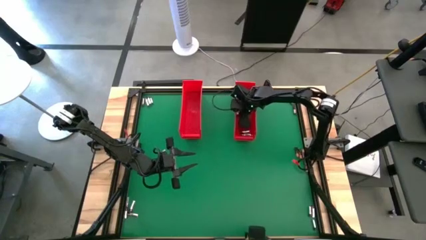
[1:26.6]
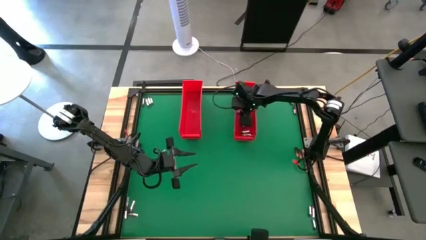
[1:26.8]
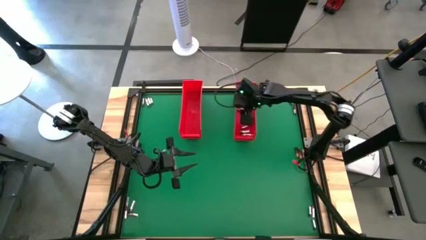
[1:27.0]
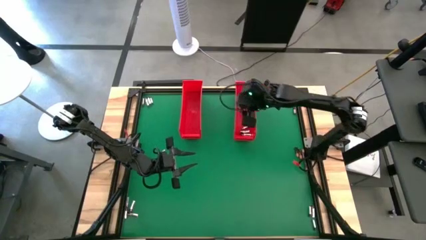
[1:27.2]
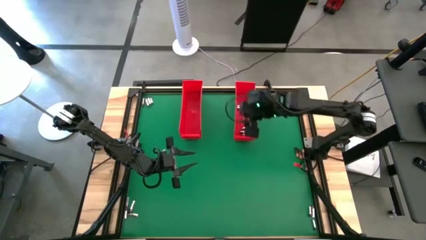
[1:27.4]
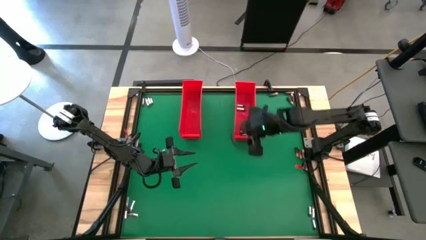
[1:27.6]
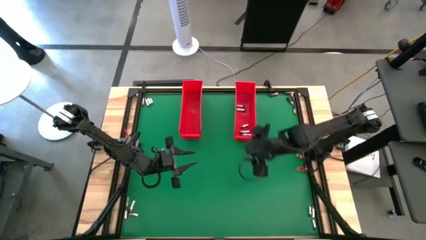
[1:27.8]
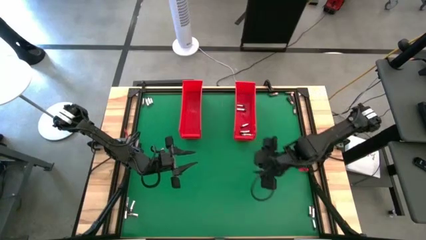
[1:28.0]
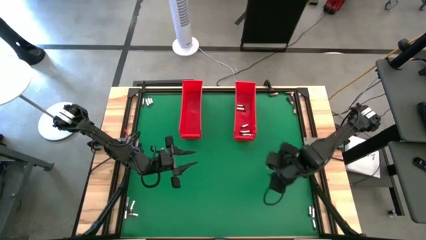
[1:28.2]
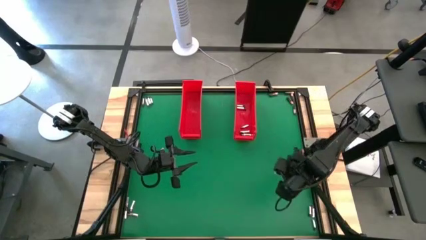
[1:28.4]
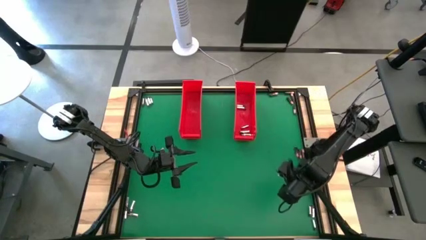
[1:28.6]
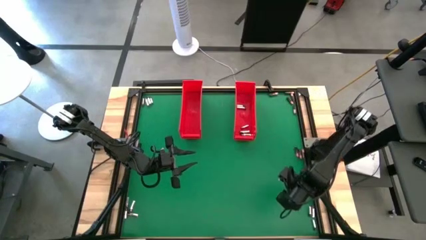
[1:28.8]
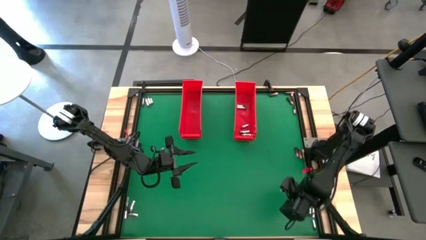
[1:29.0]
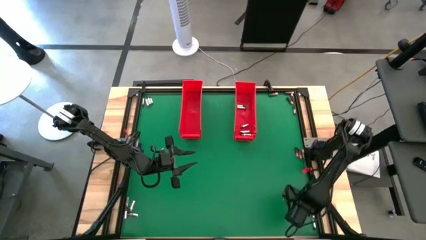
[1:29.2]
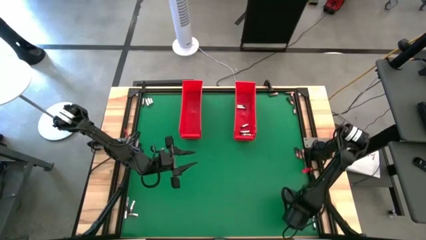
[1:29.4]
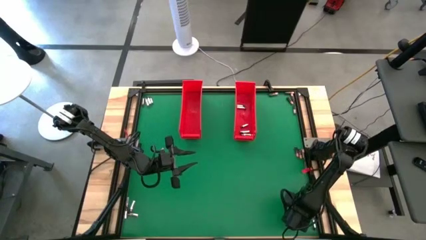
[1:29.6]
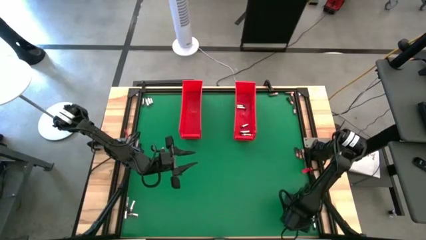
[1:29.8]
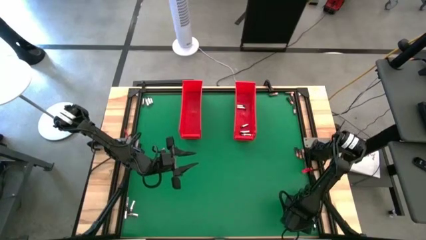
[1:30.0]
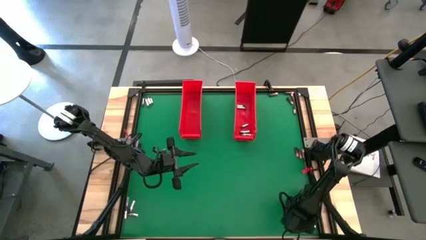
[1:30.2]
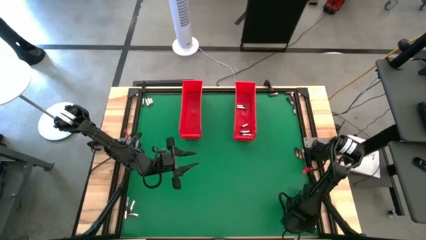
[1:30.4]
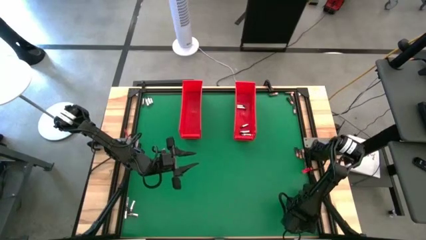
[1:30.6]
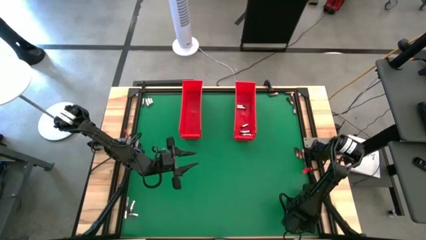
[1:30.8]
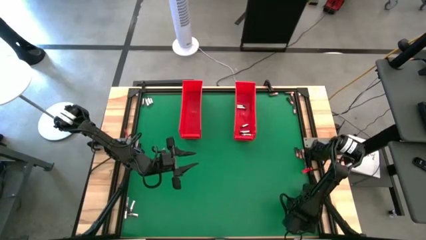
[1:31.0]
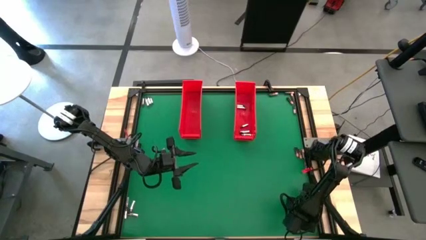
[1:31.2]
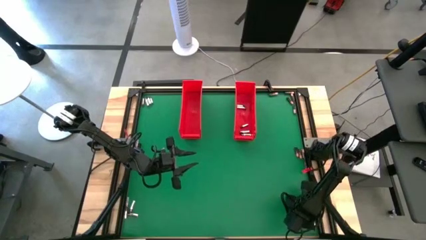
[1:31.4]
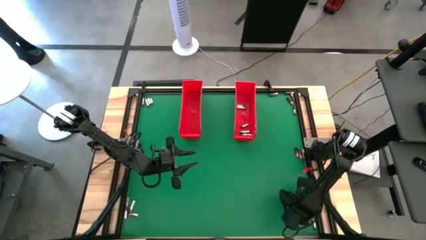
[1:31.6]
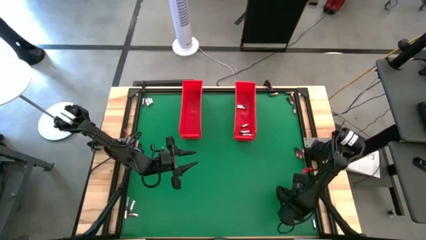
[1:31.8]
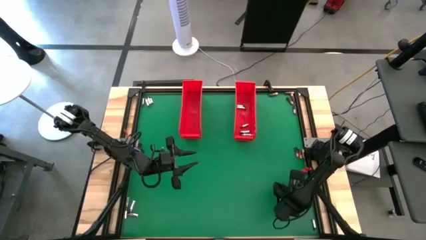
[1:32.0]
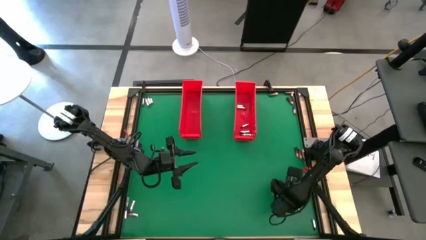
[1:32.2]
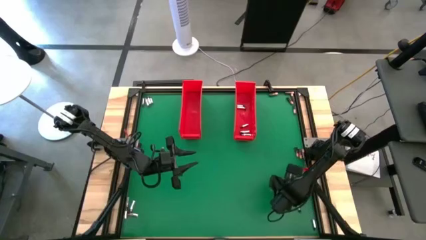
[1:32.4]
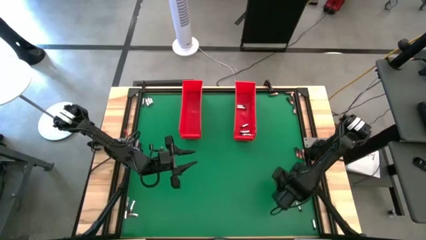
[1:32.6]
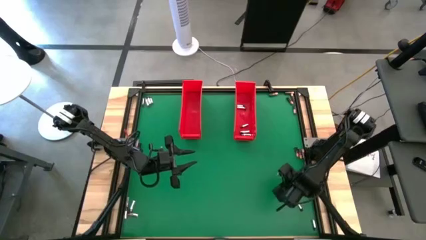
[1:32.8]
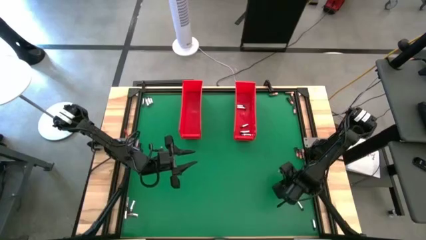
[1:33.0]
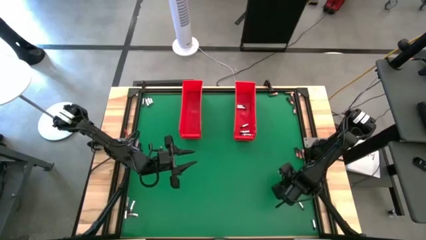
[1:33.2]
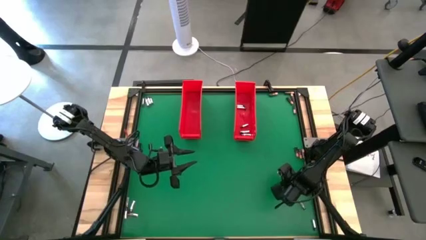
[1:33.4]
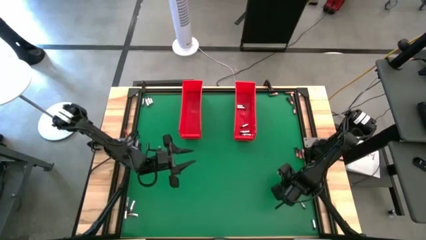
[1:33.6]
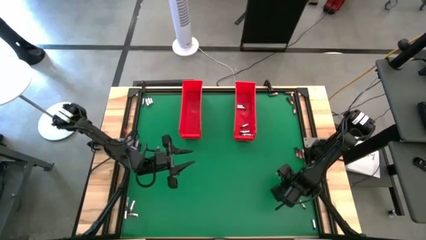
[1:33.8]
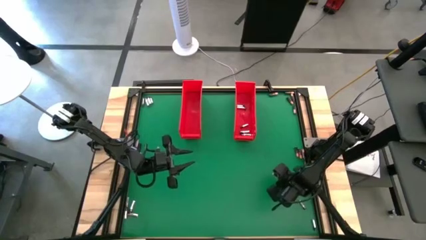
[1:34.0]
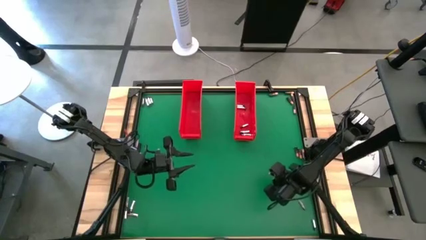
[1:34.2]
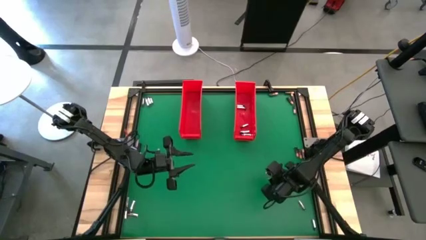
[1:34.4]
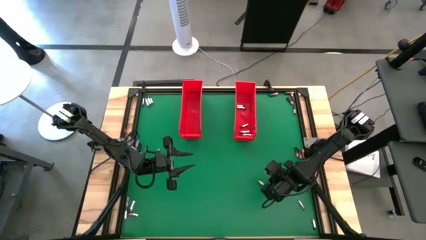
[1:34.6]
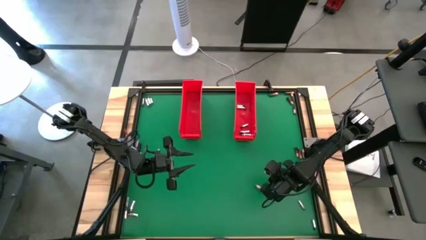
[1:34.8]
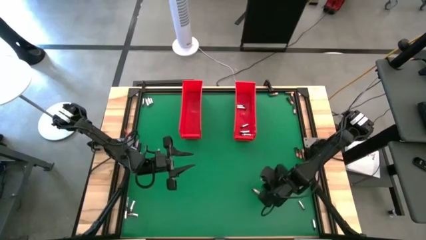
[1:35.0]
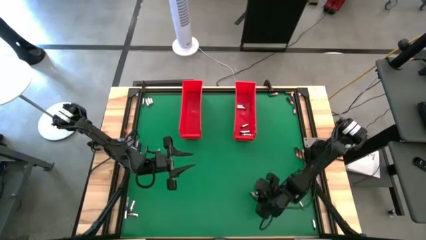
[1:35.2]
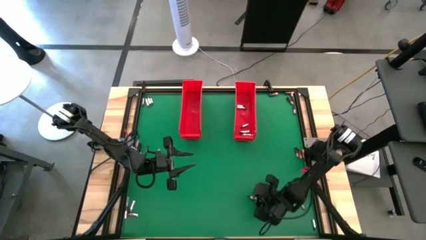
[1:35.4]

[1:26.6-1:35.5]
Task: Sort batteries
Put the silver battery into the right red bin

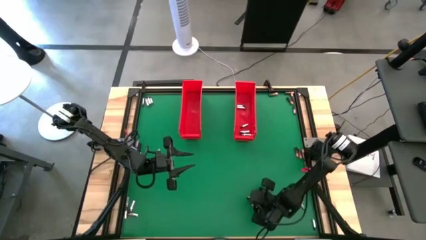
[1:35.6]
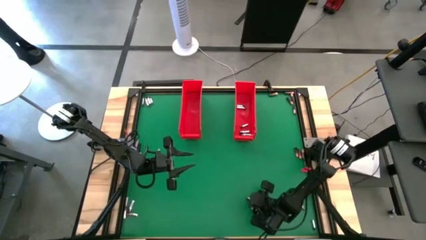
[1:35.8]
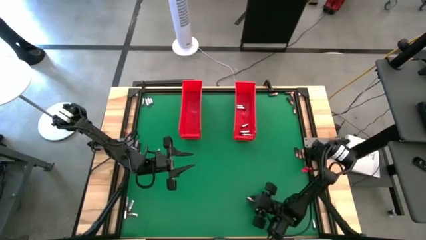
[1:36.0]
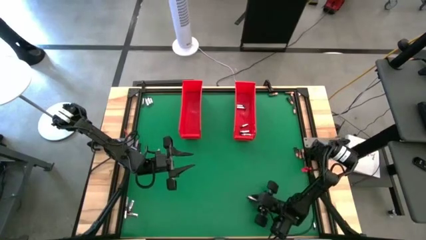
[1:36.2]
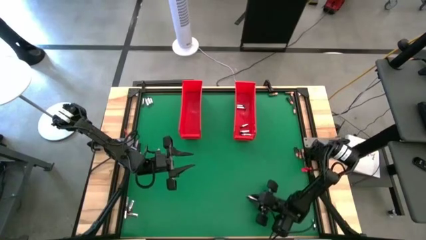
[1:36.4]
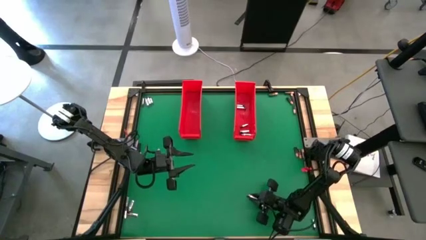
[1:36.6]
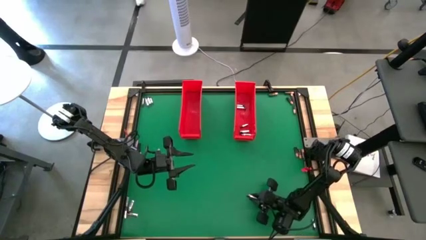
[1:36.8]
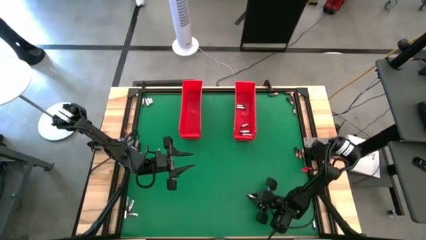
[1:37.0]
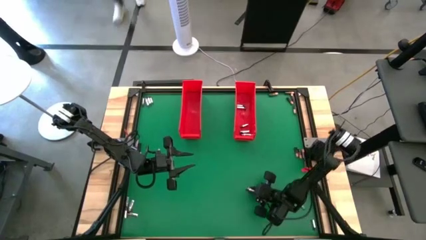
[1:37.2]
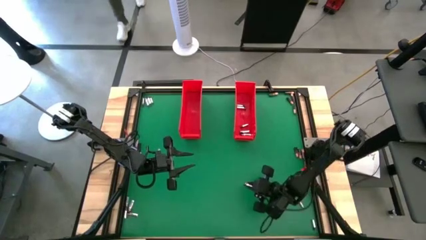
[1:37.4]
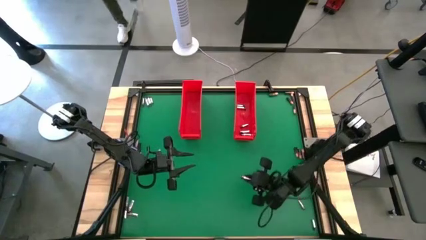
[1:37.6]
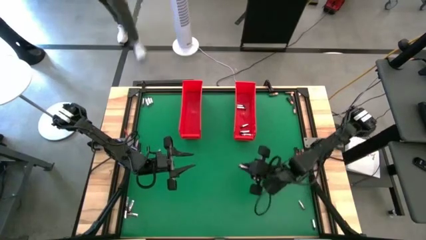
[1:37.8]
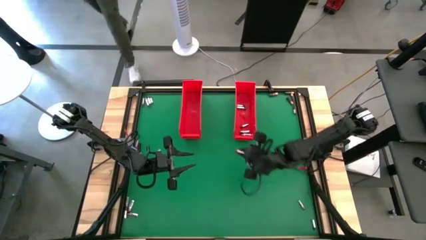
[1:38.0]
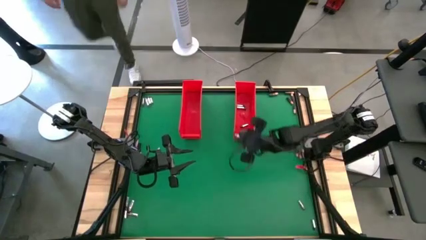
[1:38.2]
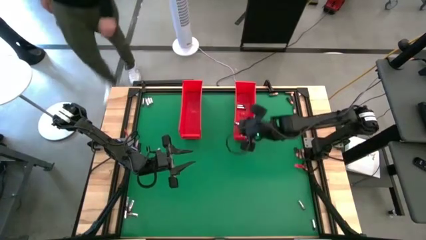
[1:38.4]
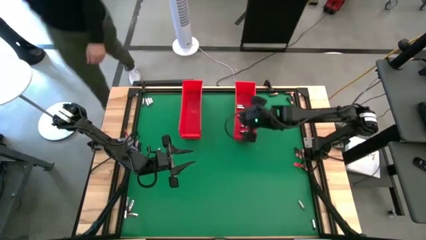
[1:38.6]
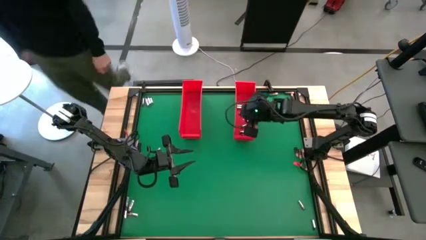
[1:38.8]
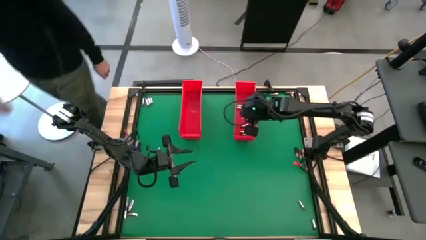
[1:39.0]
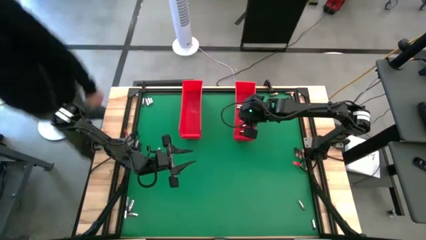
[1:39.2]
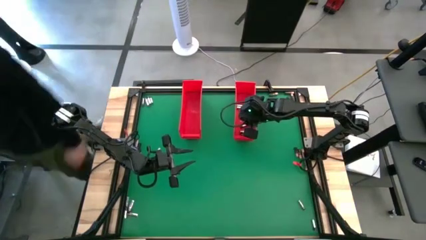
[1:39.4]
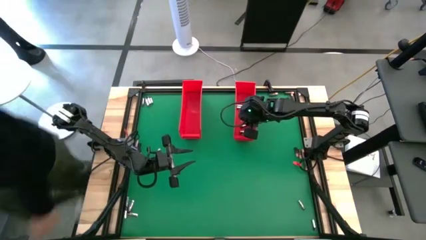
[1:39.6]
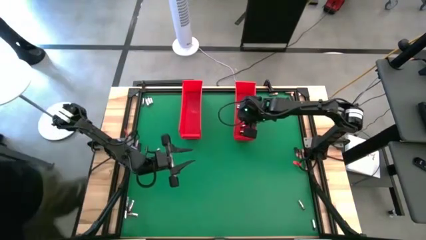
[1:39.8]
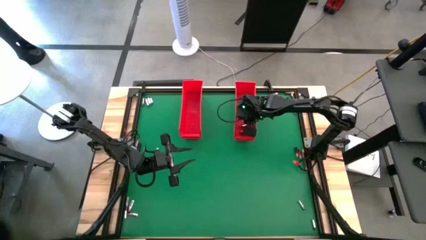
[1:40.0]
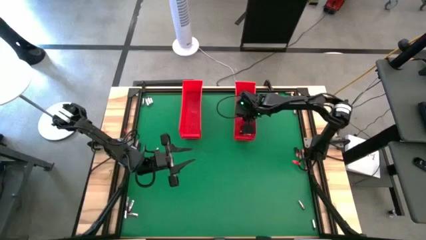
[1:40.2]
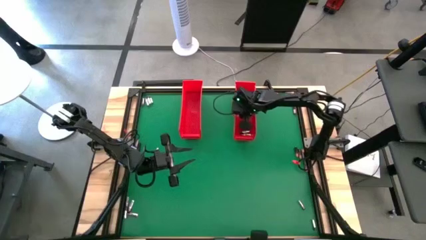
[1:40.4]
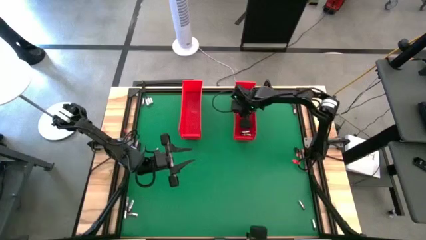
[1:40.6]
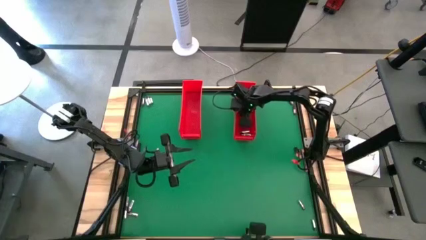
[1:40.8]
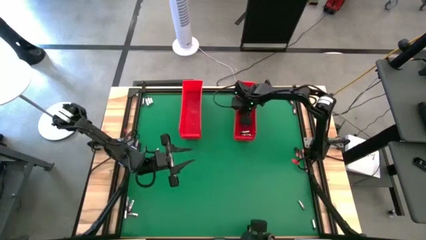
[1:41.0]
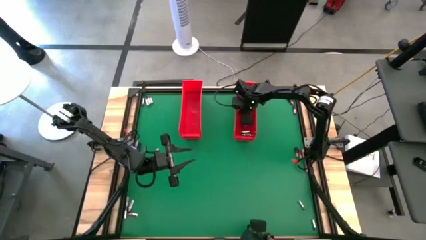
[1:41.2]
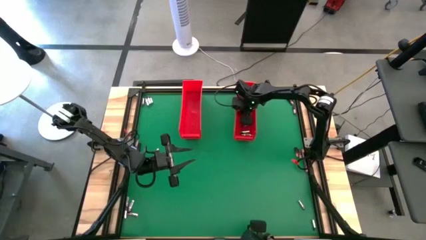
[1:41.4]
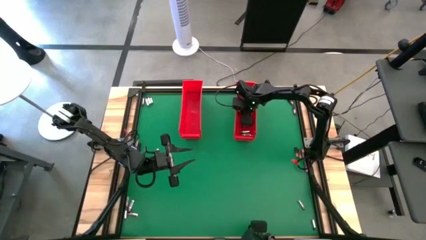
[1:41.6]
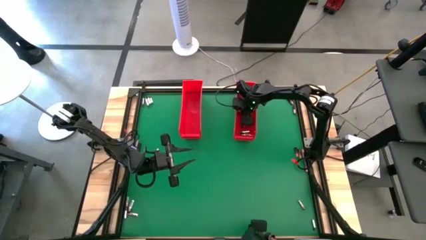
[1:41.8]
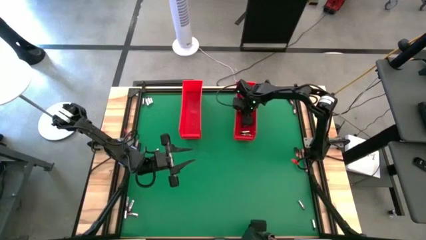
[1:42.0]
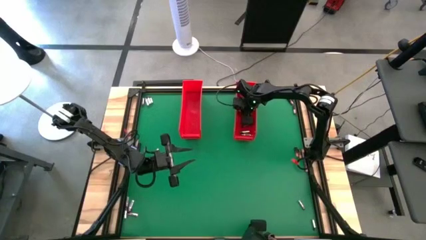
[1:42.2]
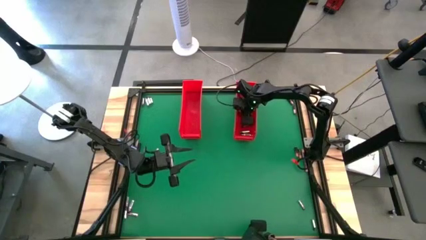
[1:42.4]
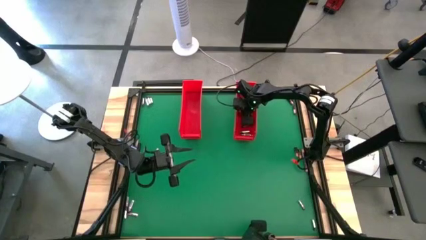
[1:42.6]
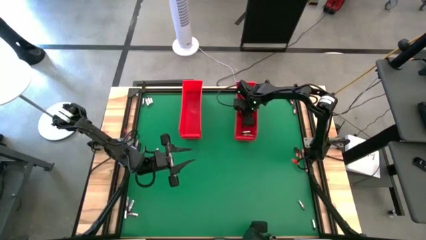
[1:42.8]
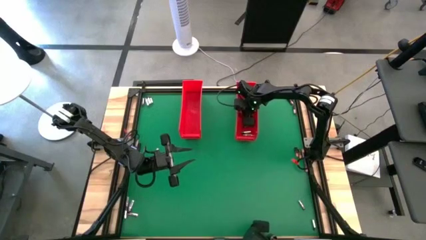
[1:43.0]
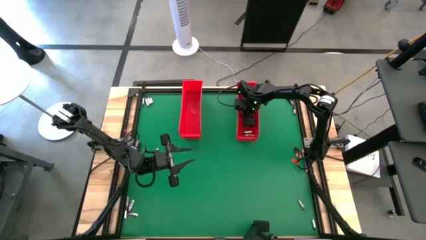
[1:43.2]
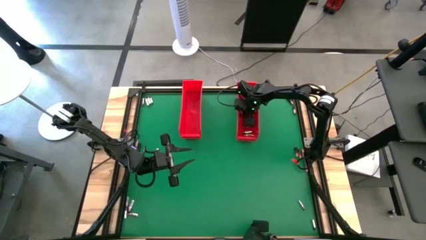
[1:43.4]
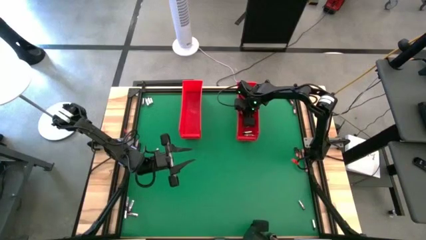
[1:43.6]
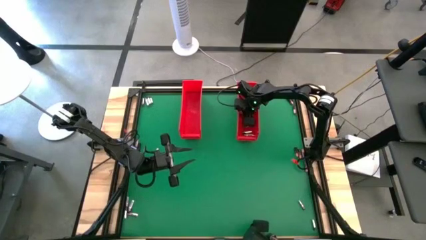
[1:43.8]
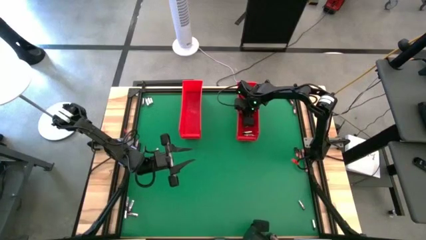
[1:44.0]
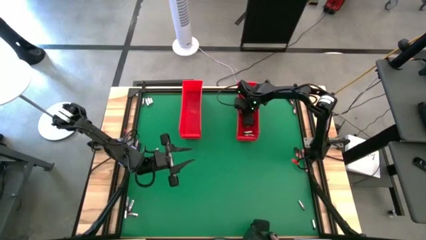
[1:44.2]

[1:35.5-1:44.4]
Put the silver battery into the right red bin
